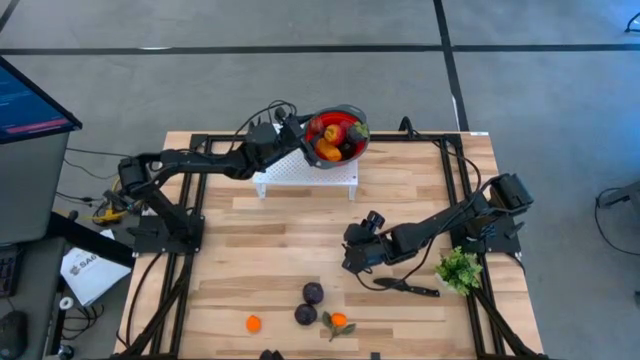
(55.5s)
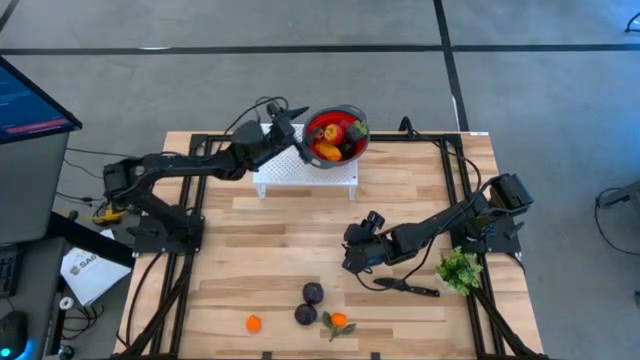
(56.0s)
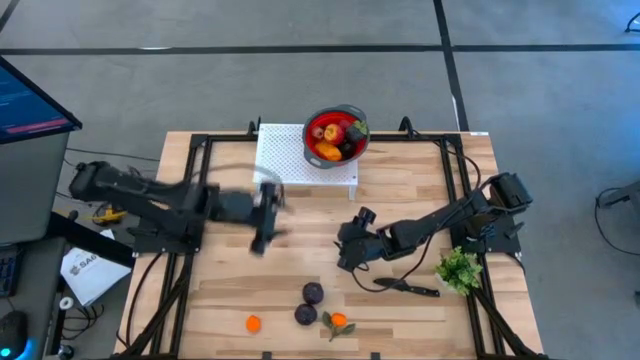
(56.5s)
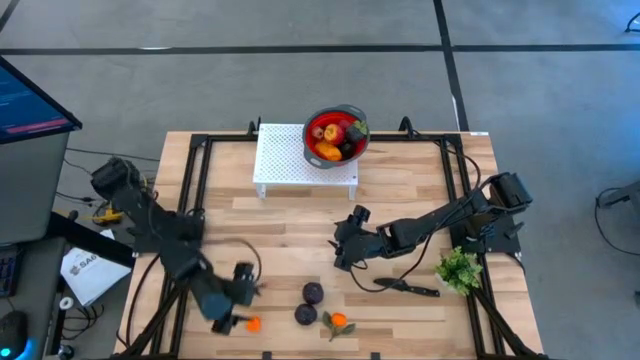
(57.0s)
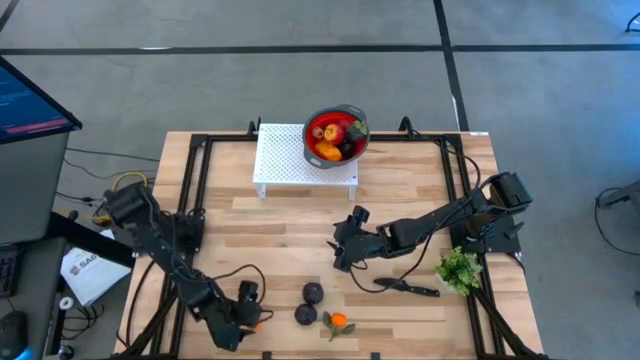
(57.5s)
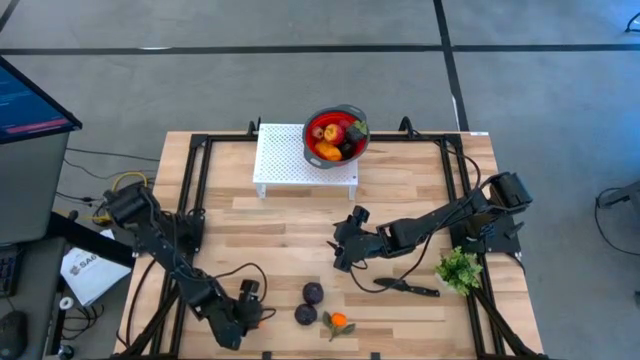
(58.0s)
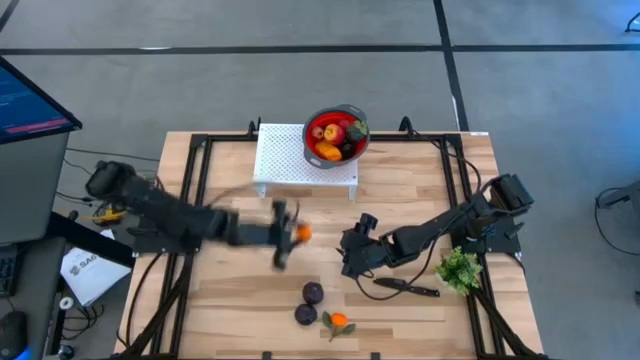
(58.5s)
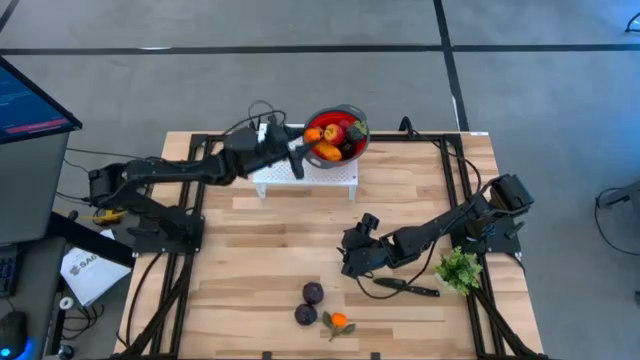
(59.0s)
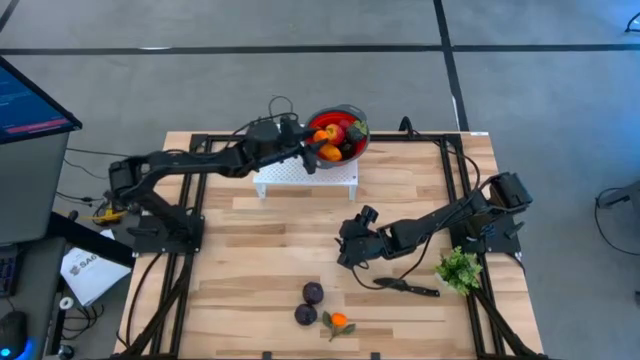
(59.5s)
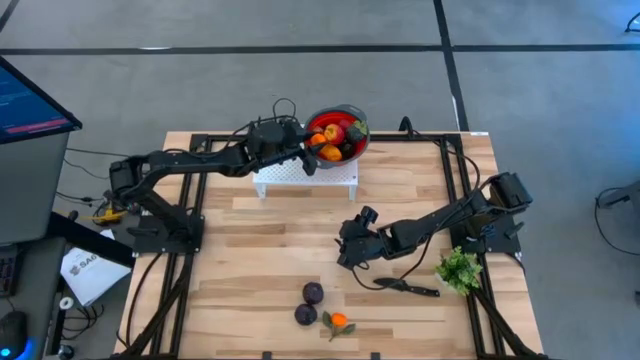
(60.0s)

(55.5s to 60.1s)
Task: Pick & Place Fruit
Put the orange into the red strainer on the shelf

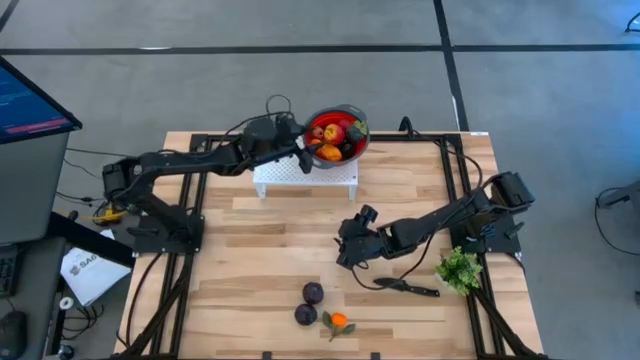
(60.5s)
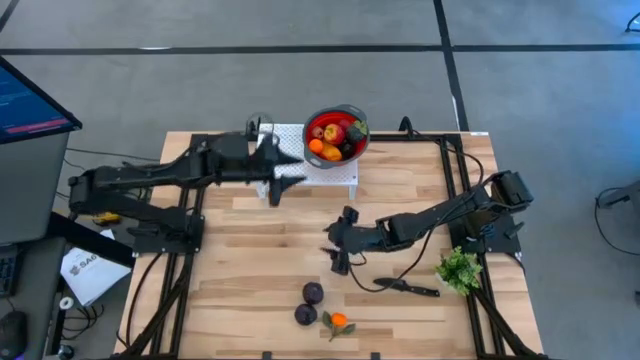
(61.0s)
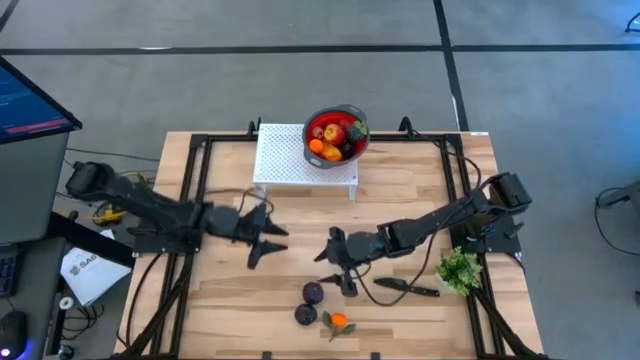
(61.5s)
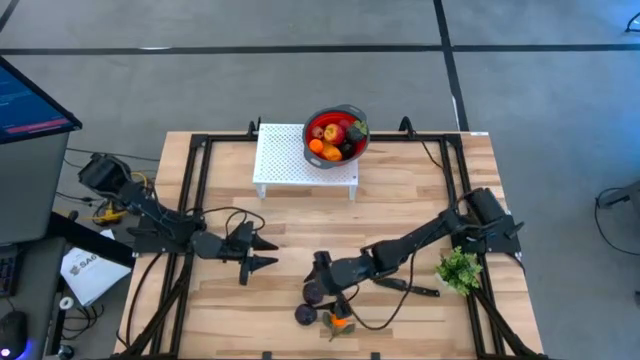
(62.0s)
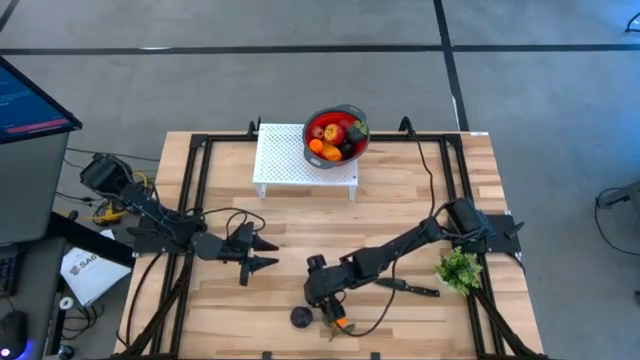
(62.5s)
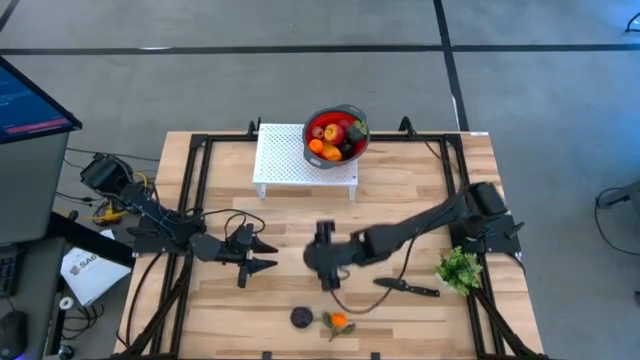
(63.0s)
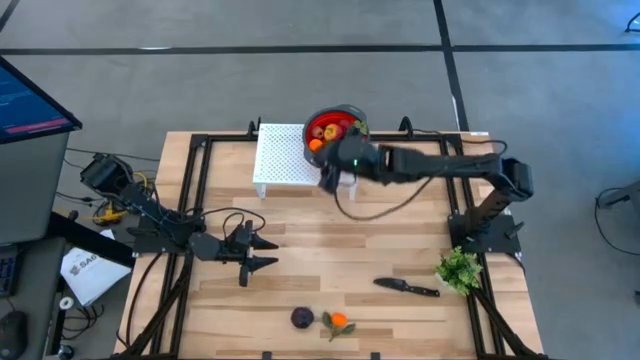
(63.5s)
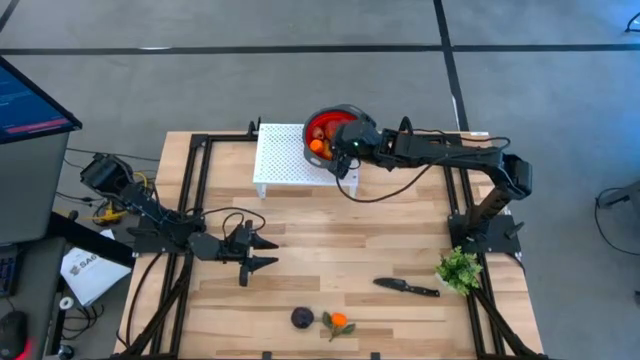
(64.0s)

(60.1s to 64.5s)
Put the plum into the red strainer on the shelf

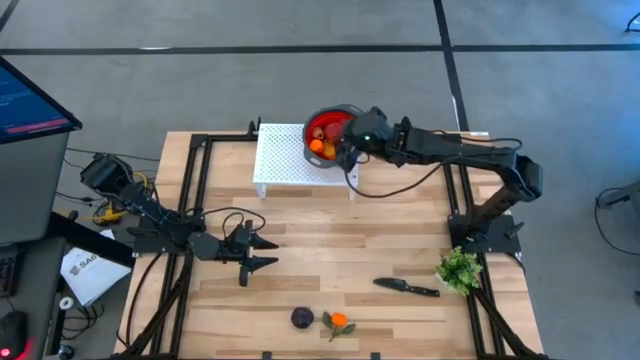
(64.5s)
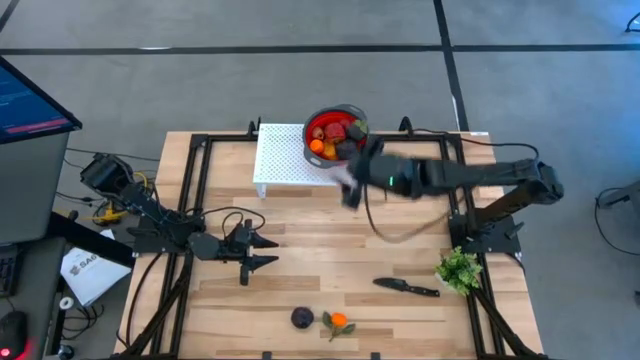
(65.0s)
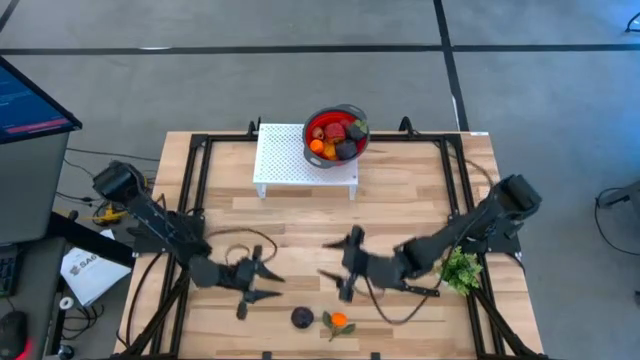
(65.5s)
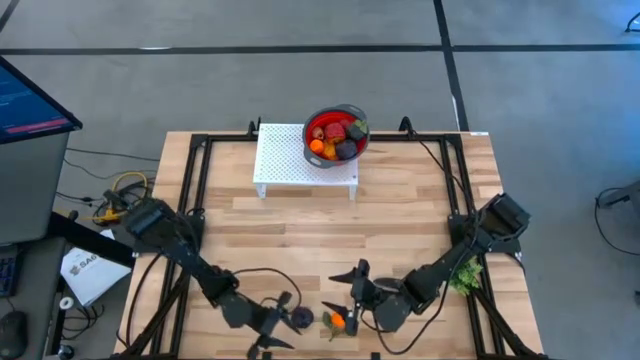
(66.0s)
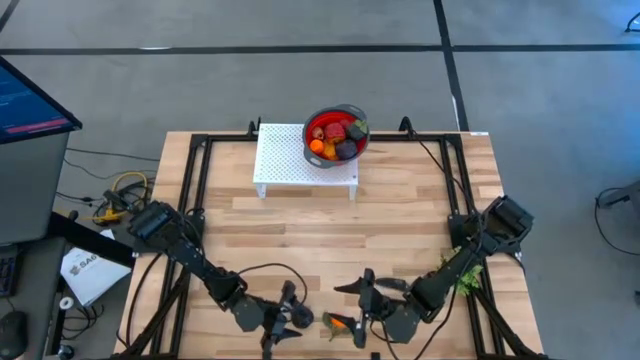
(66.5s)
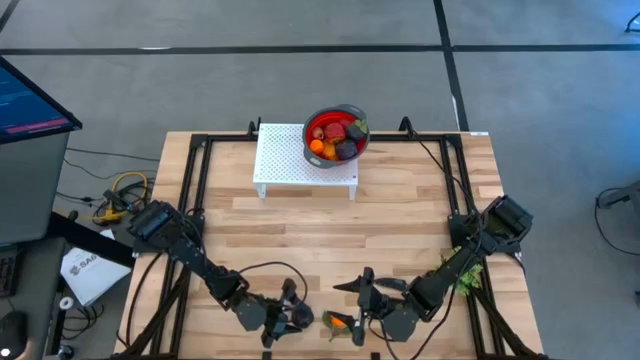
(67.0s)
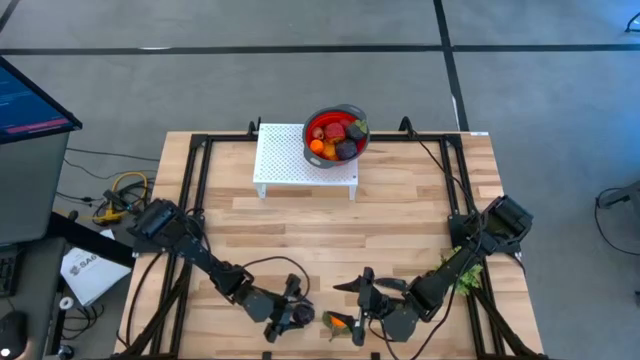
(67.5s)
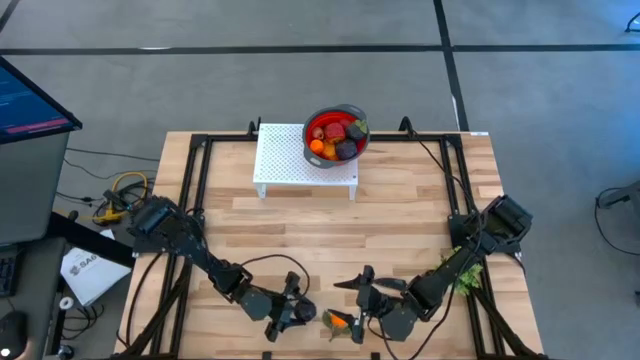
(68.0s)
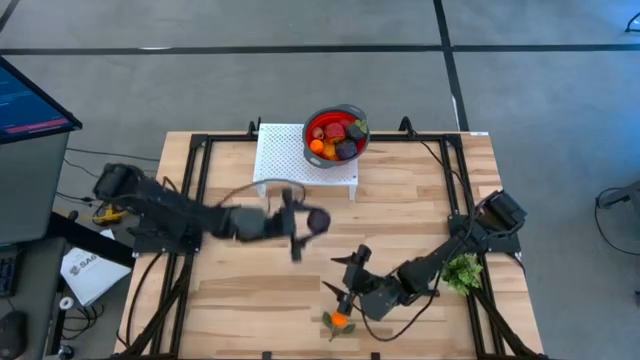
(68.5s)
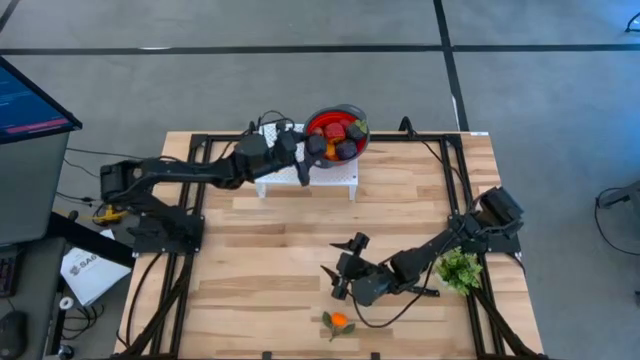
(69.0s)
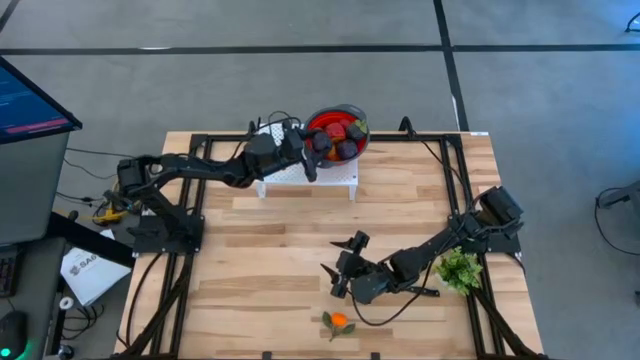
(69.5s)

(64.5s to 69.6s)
Put the plum into the red strainer on the shelf

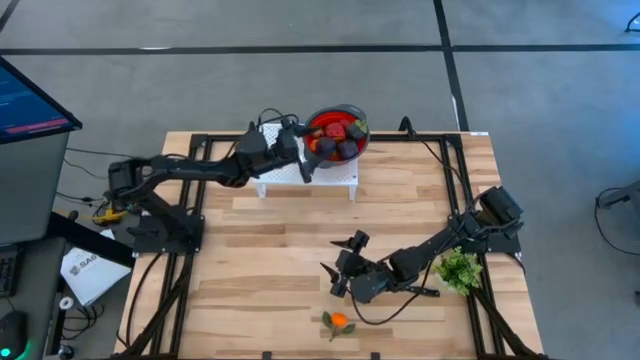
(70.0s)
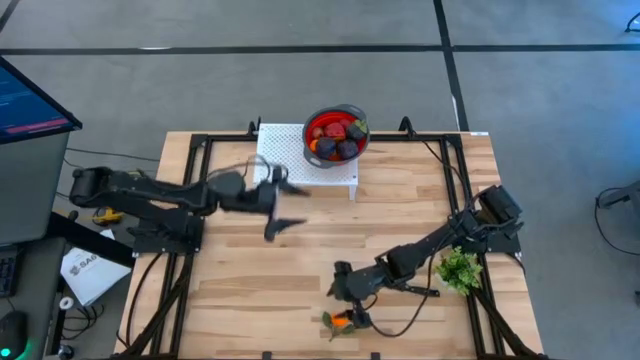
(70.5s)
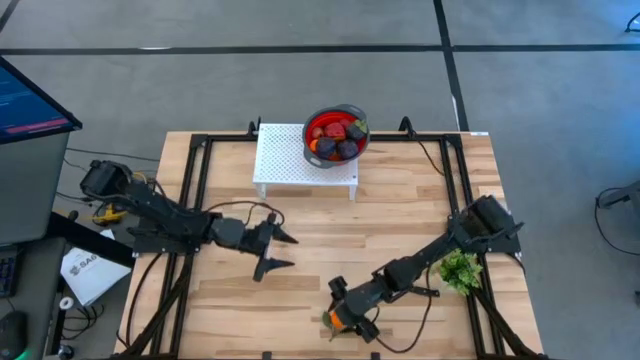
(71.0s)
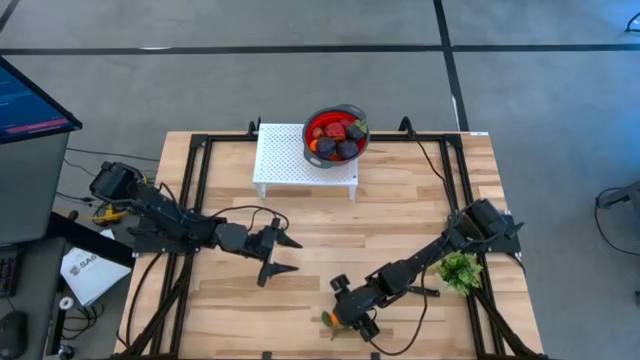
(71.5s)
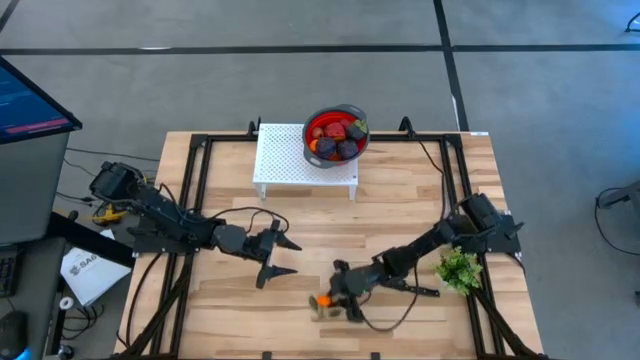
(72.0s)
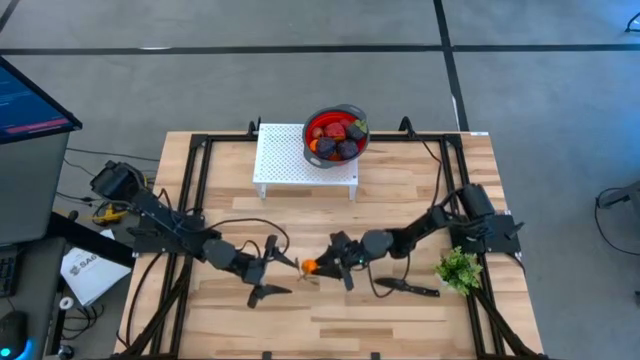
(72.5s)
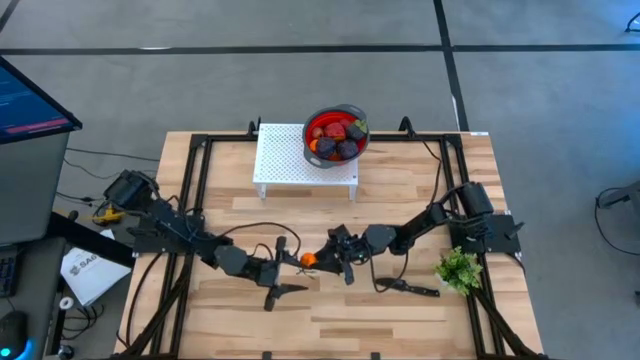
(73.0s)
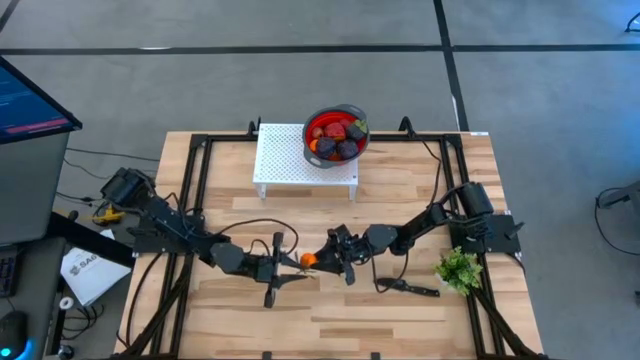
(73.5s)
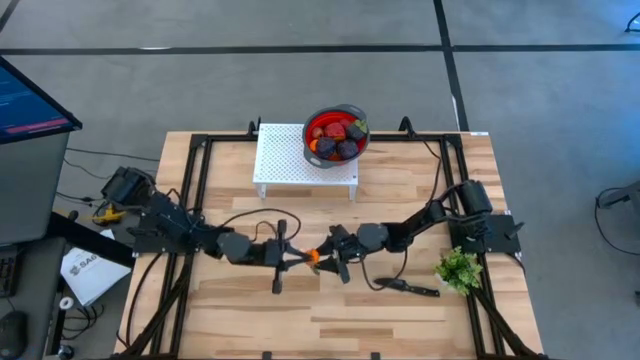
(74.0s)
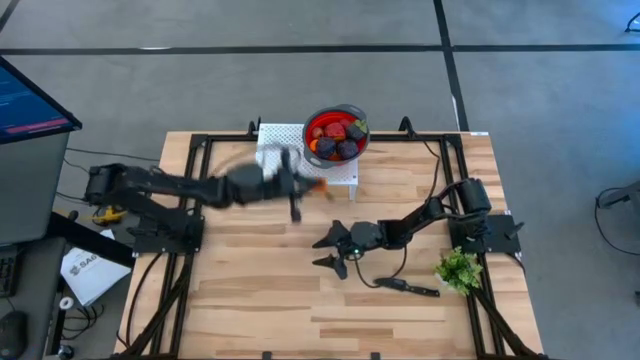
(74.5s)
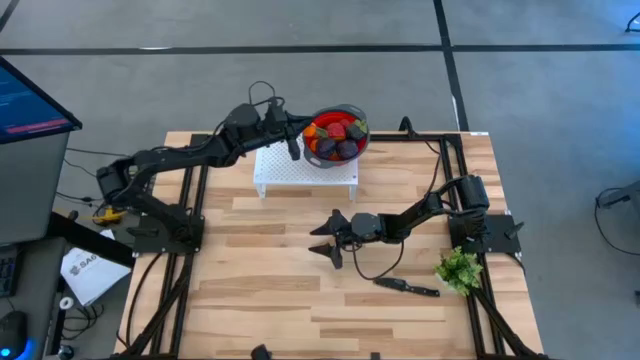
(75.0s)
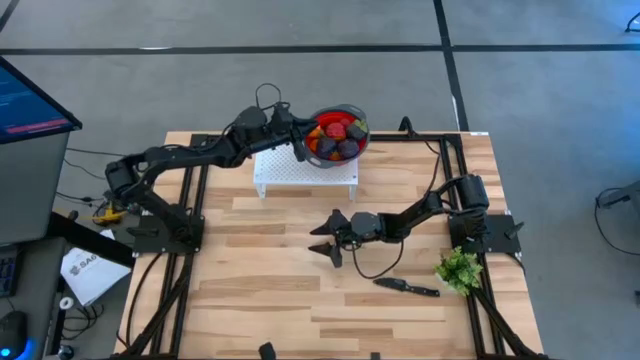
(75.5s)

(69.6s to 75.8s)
Put the tangerine into the red strainer on the shelf
